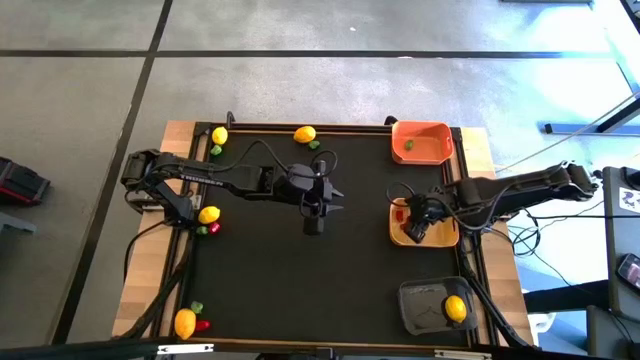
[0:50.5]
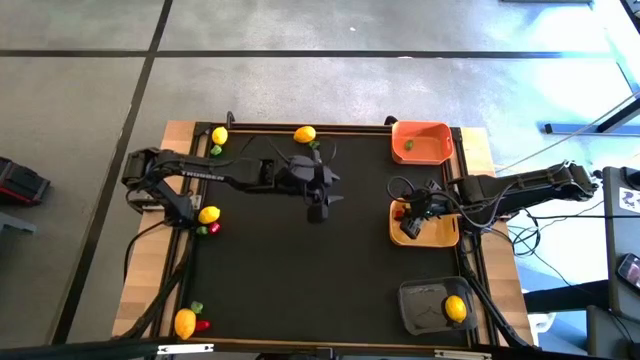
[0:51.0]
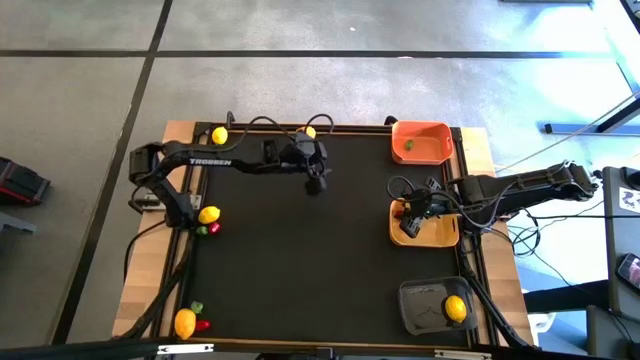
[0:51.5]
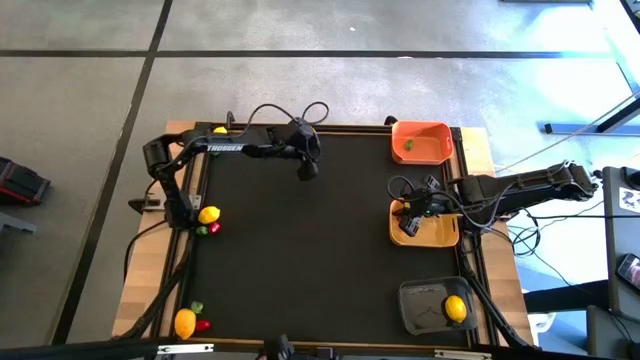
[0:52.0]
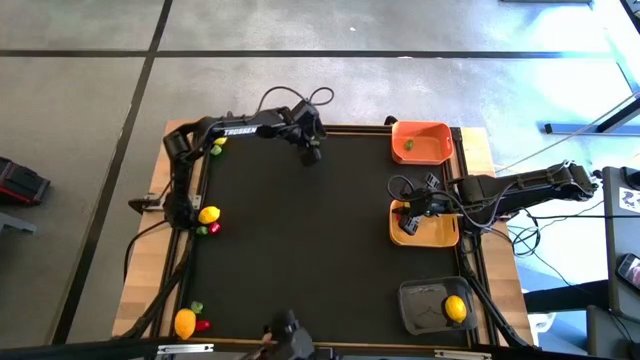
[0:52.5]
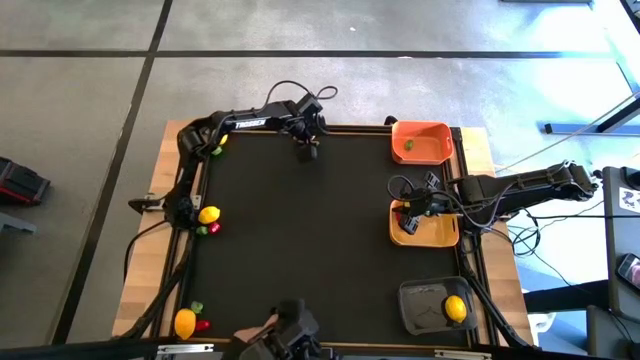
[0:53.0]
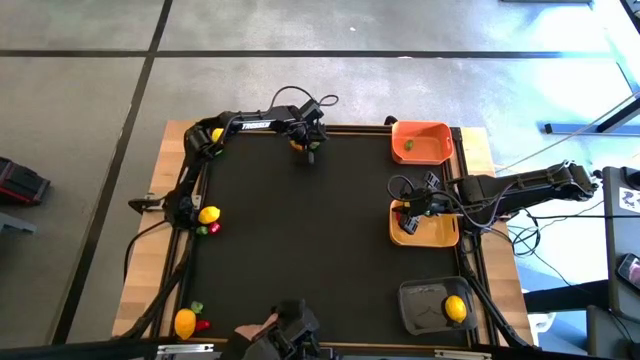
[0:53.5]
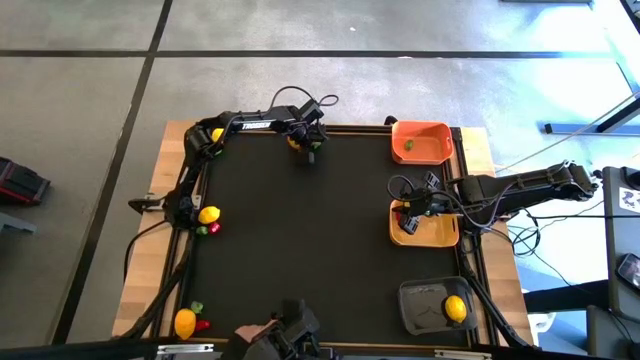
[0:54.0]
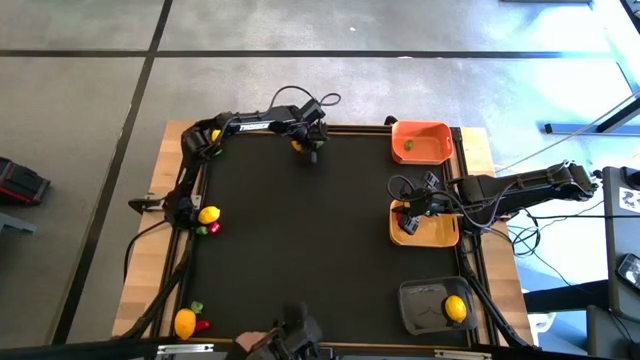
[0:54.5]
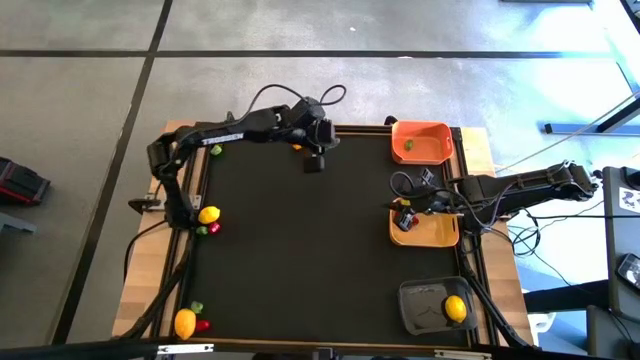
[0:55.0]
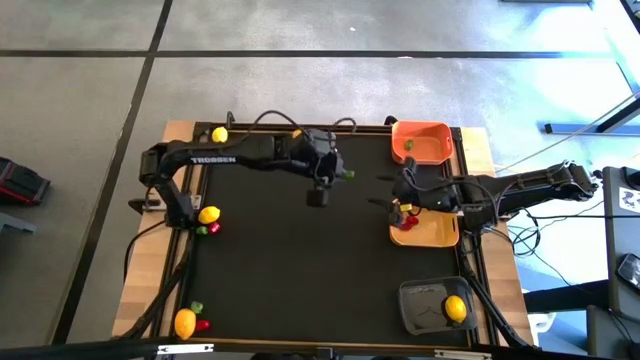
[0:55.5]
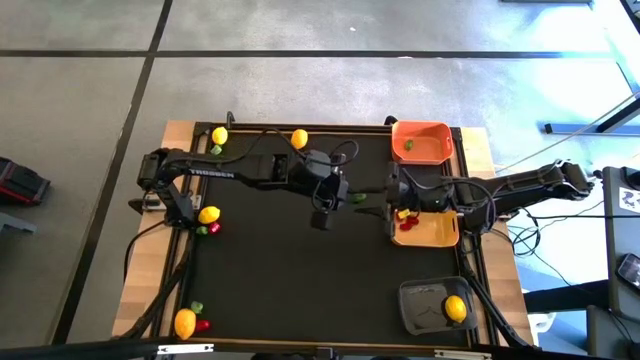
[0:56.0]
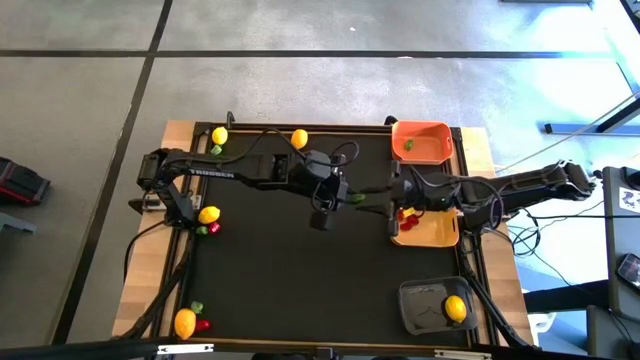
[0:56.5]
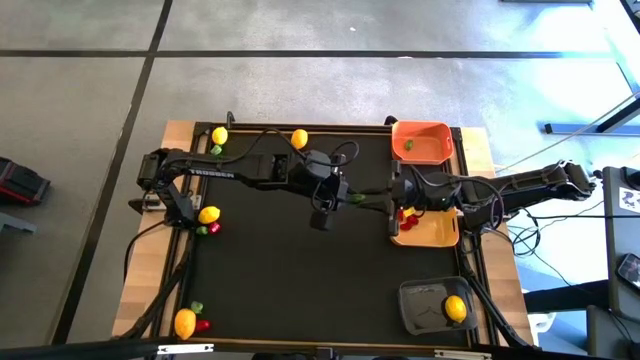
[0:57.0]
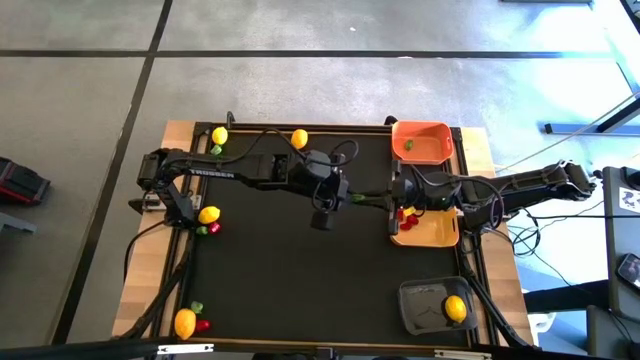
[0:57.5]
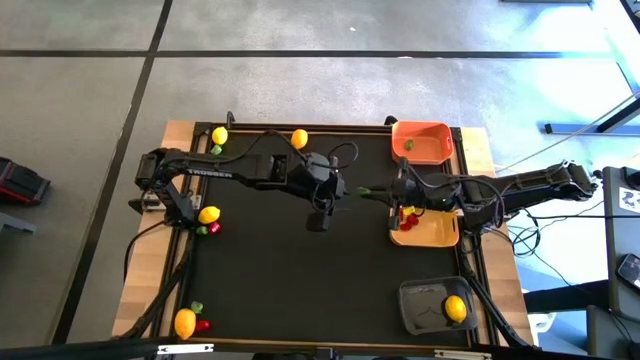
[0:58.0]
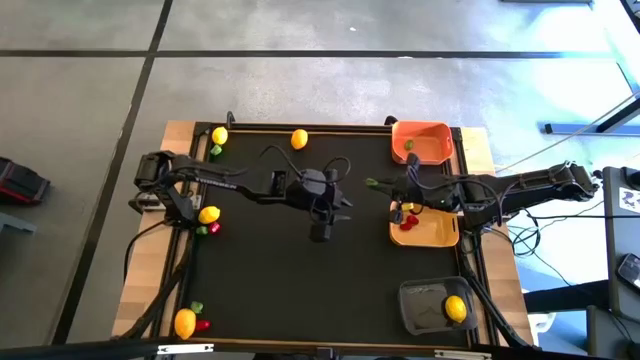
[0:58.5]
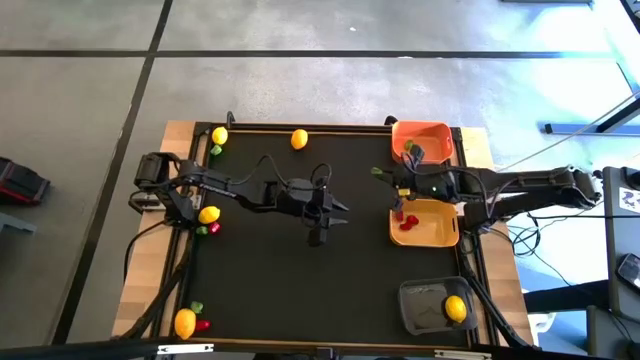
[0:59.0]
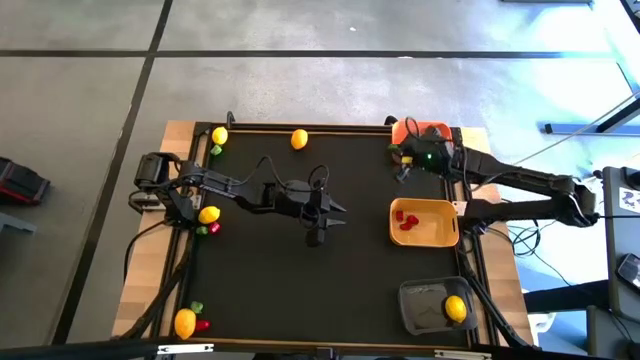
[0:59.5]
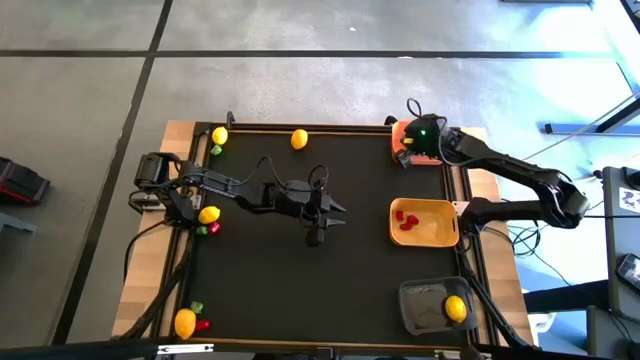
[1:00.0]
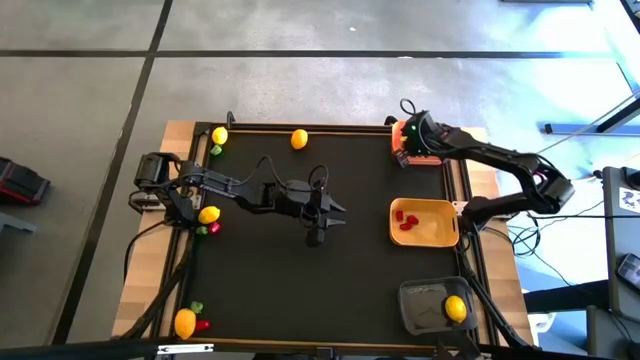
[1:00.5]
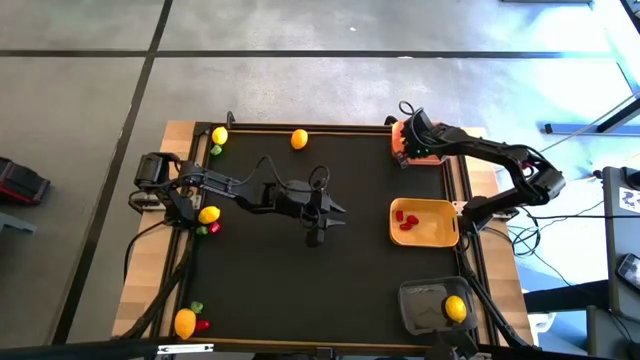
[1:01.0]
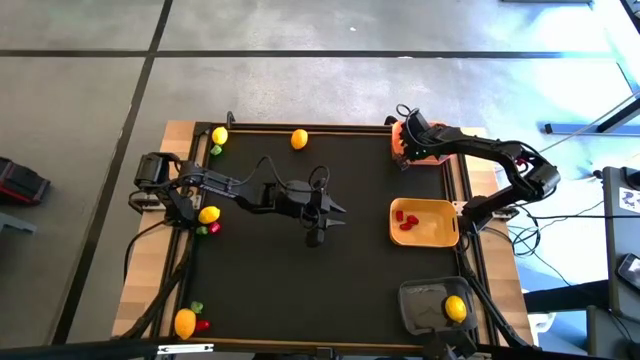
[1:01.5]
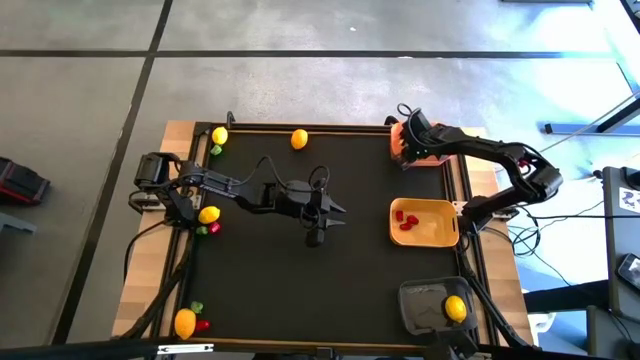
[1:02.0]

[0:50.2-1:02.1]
Task: Sort produce into baskets
Put the top right green chili pepper into the orange bin

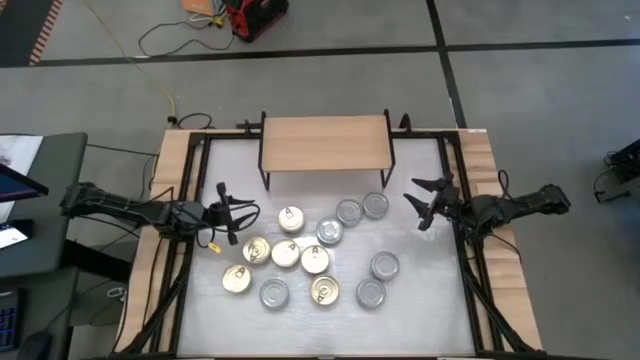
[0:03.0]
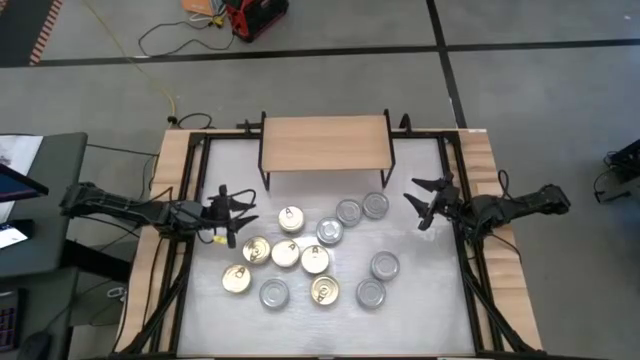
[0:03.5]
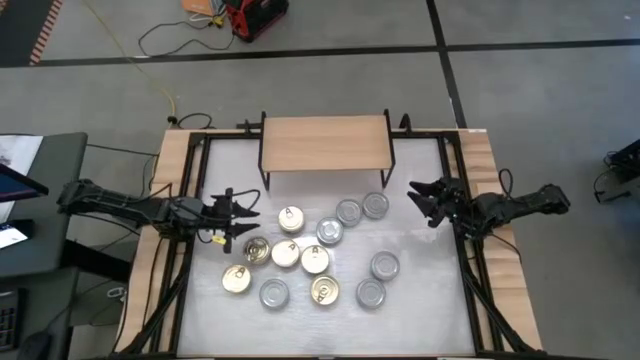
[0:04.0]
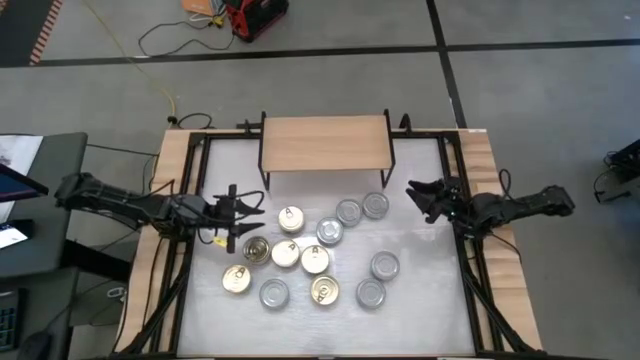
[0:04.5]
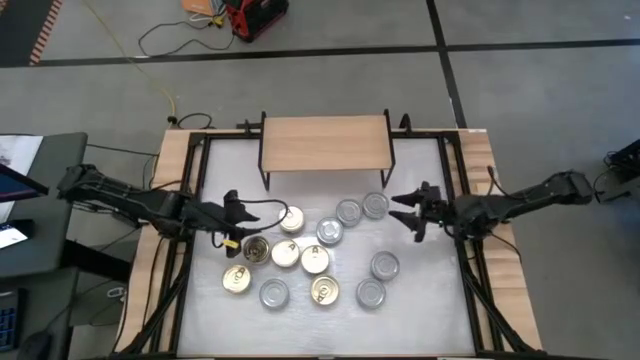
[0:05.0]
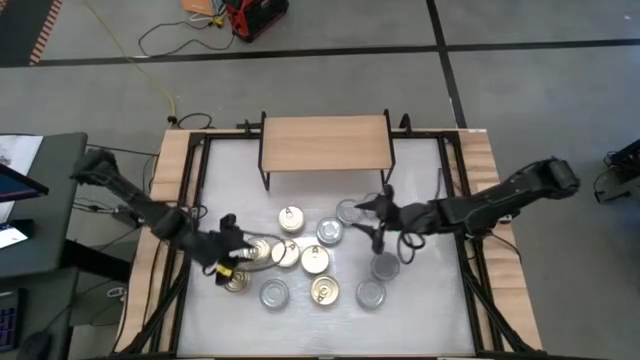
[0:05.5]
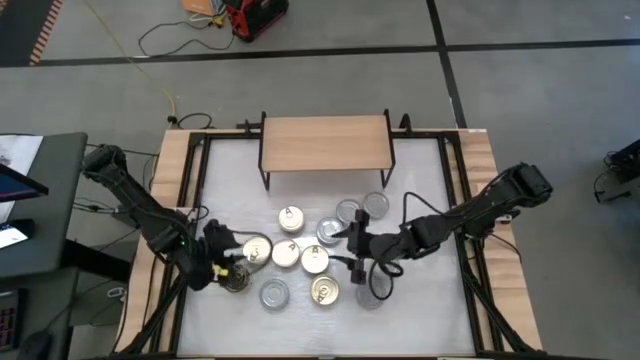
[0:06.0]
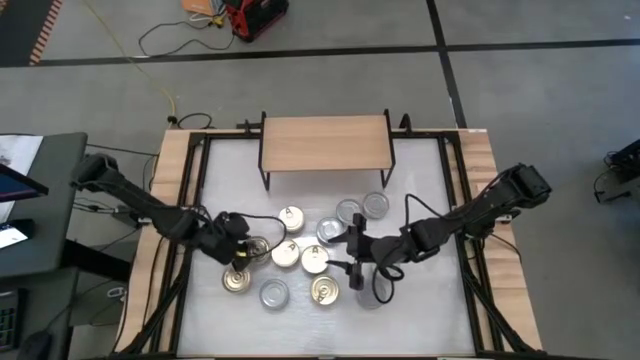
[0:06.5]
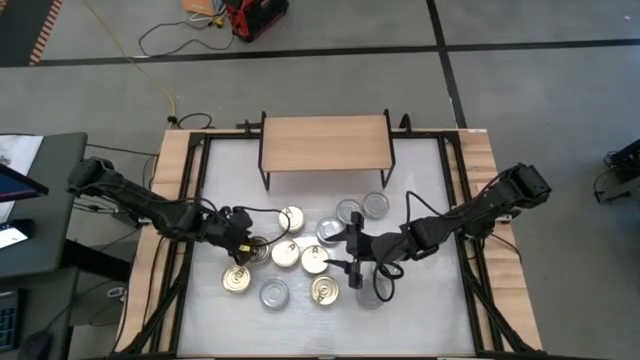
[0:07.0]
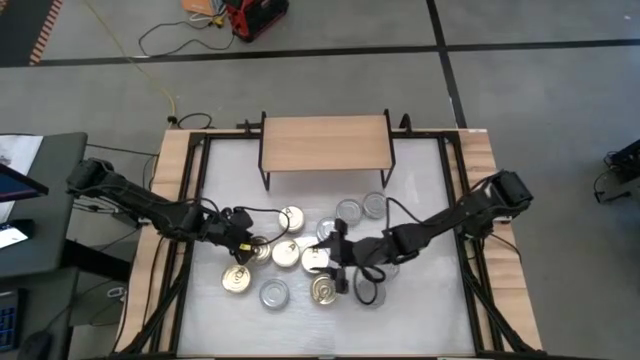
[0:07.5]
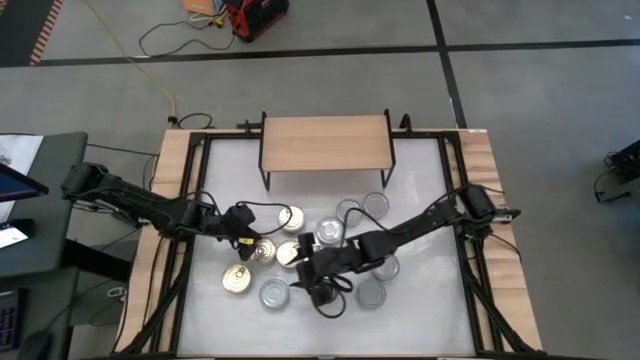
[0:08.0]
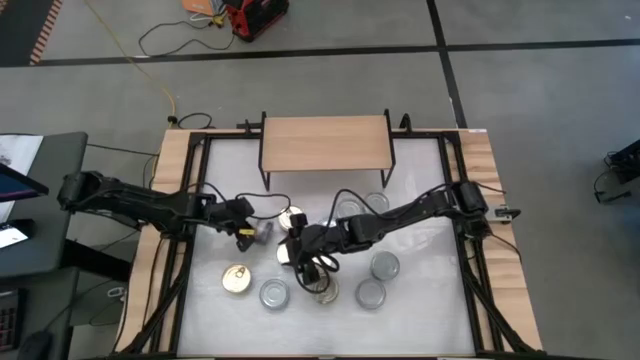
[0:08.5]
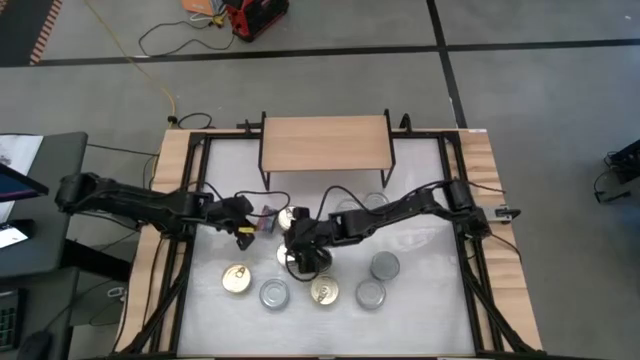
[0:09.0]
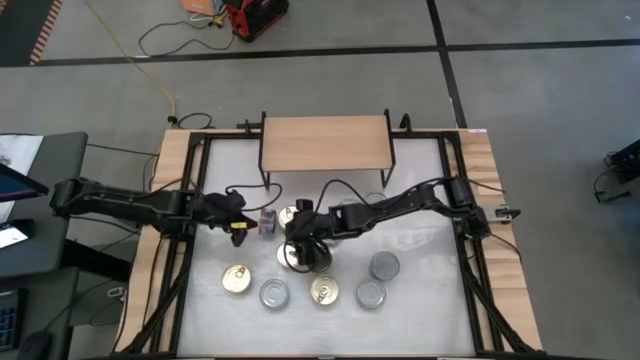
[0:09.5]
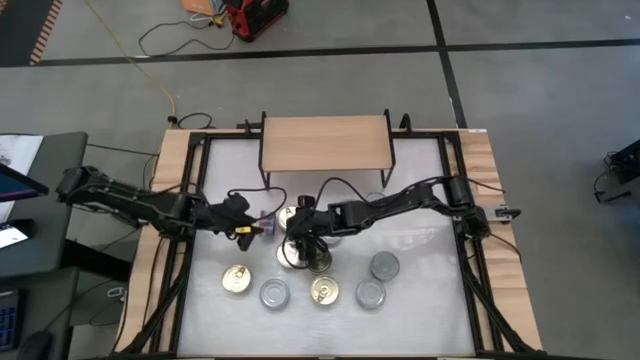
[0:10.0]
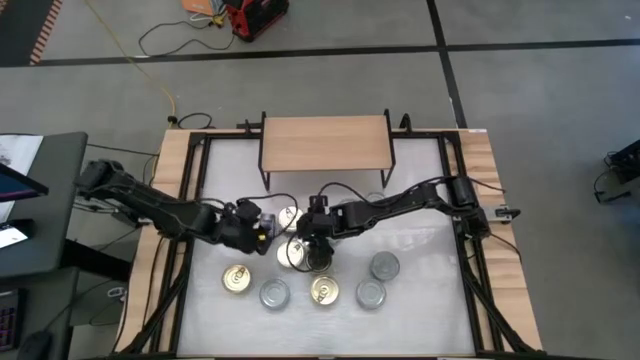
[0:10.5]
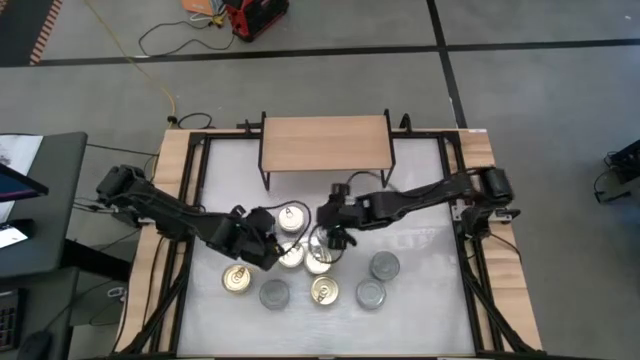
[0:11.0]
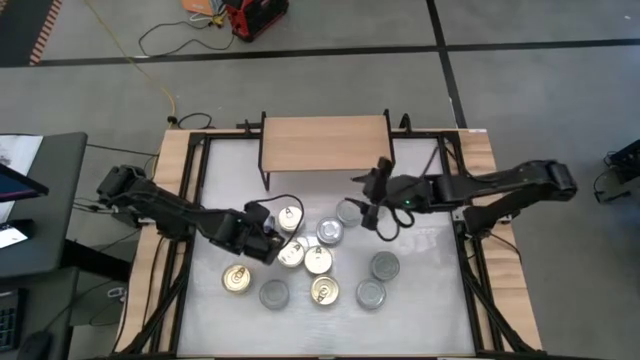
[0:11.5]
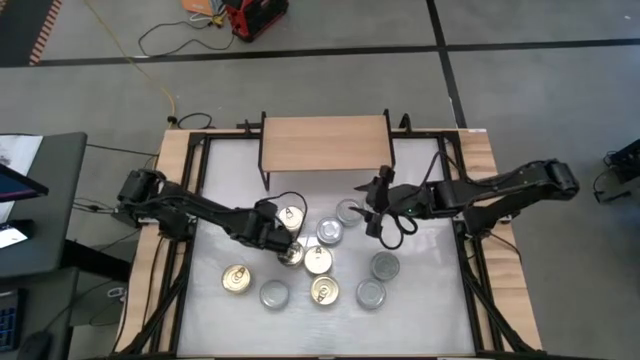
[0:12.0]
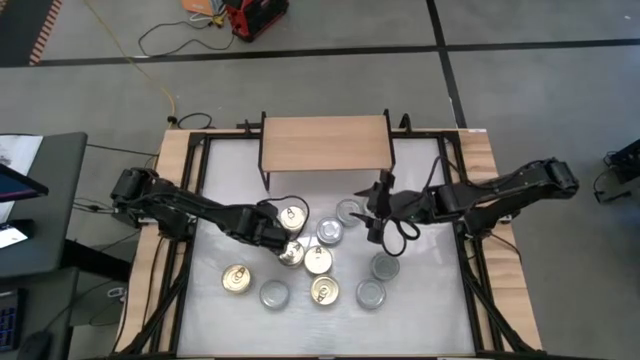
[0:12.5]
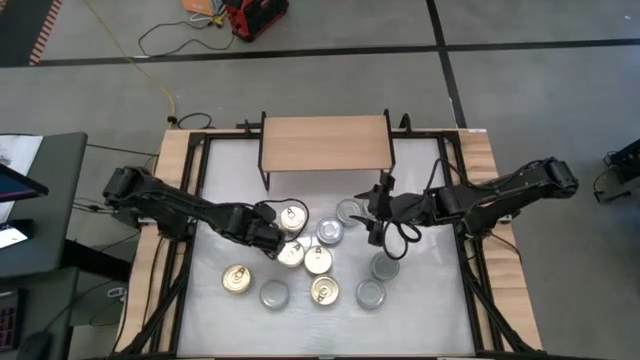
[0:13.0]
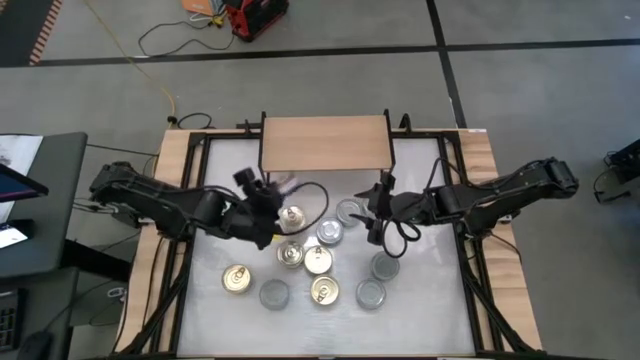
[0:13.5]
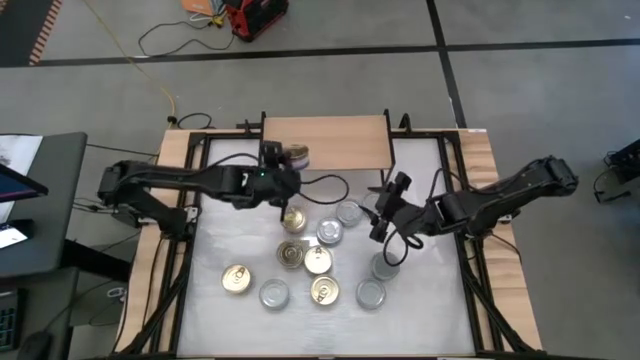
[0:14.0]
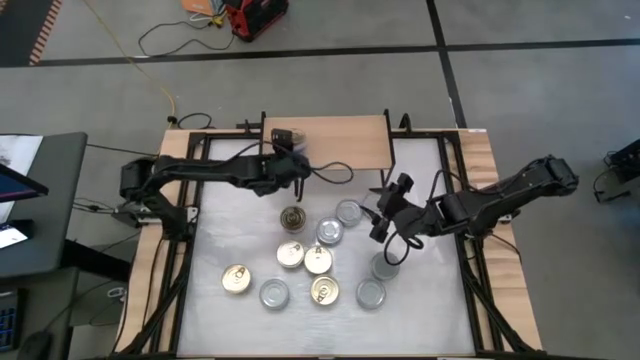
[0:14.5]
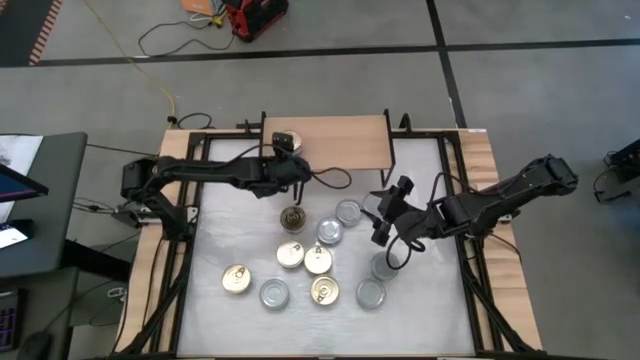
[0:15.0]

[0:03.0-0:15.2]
Task: Stack canned seafood by type on shelf
Put the the blue tuna can on the shelf
